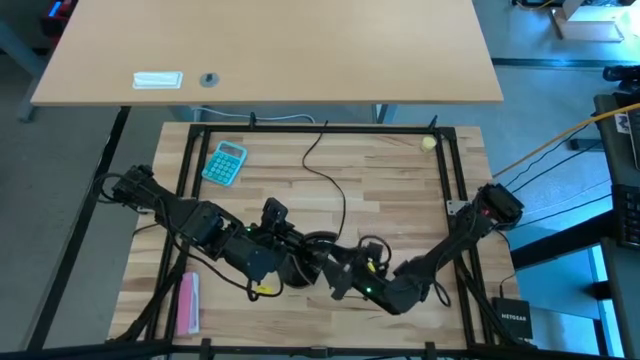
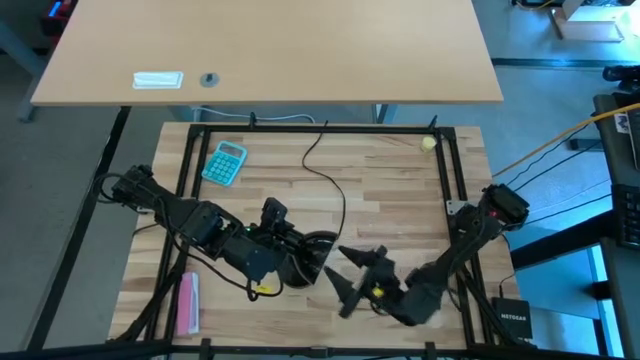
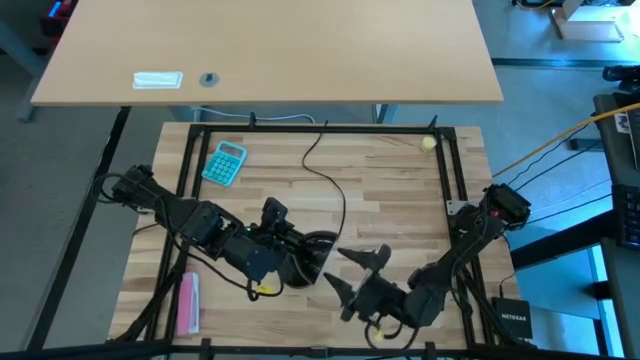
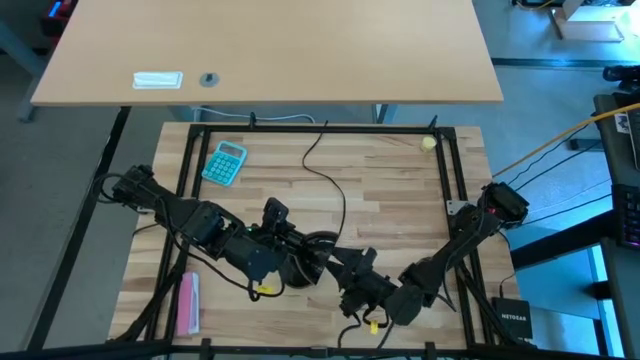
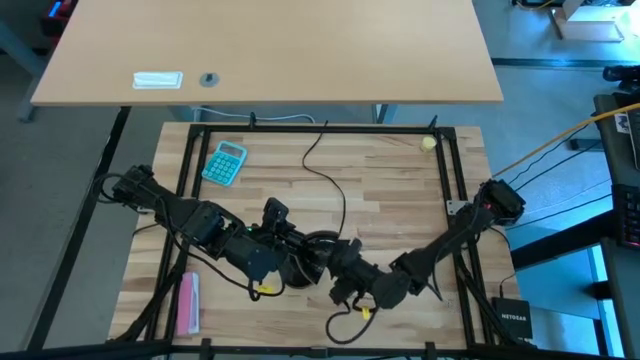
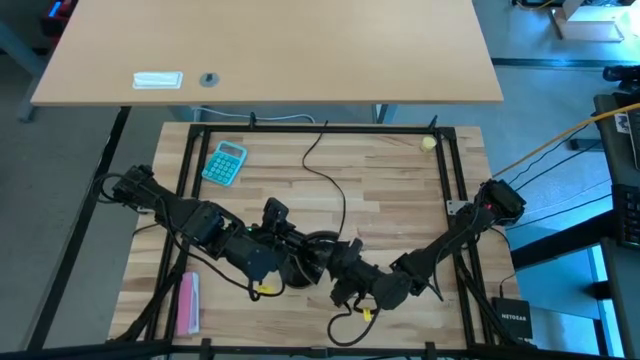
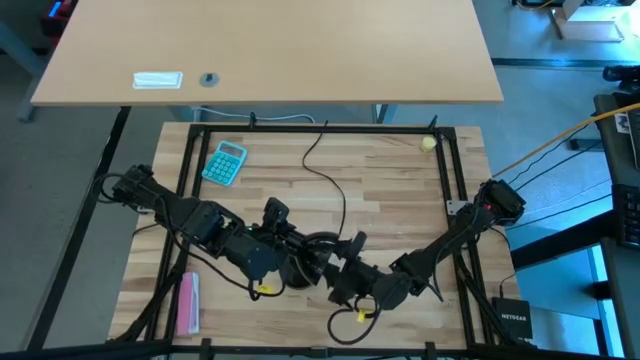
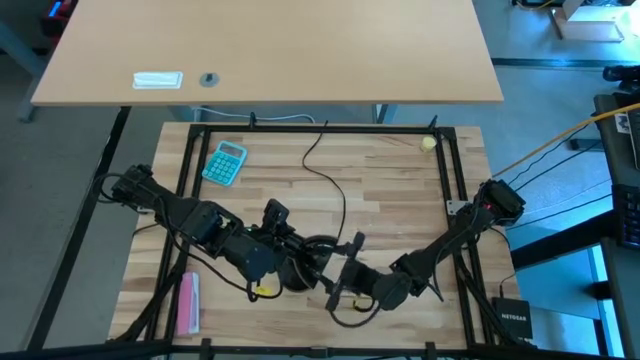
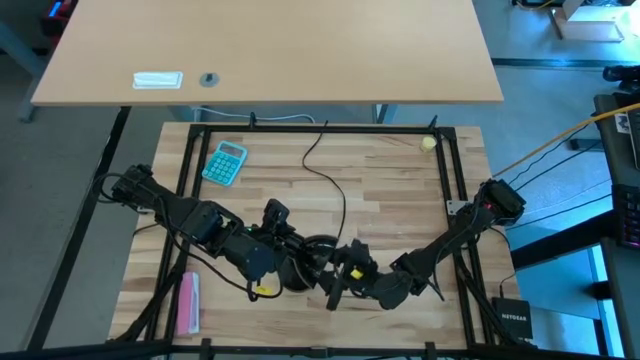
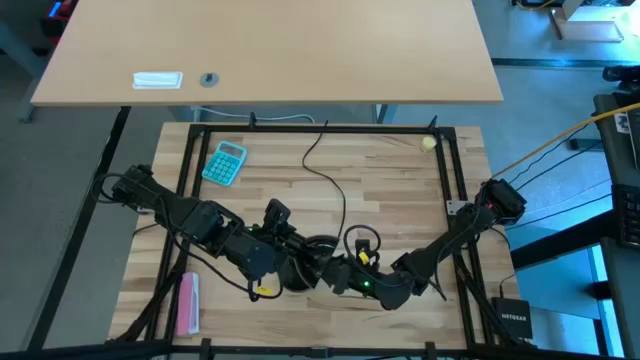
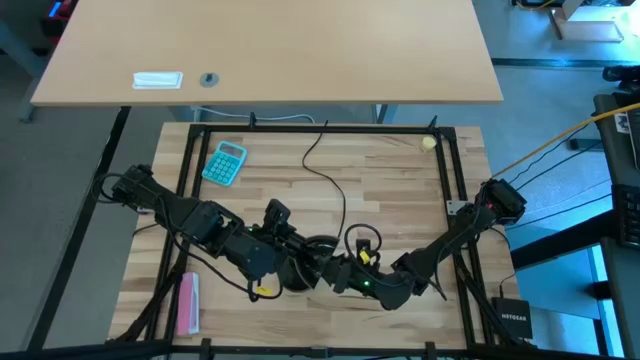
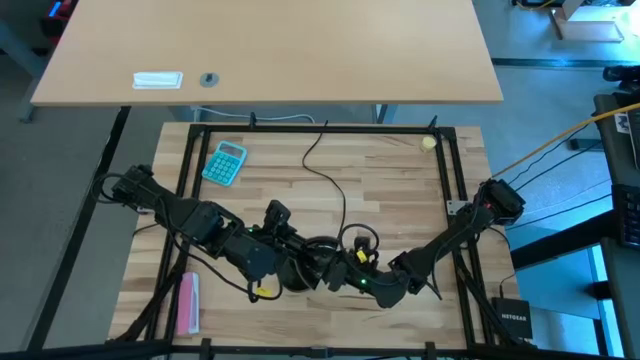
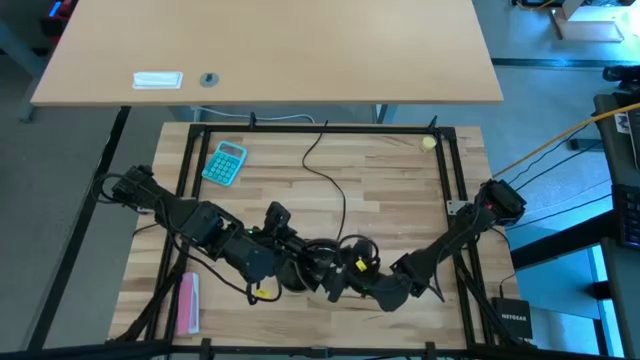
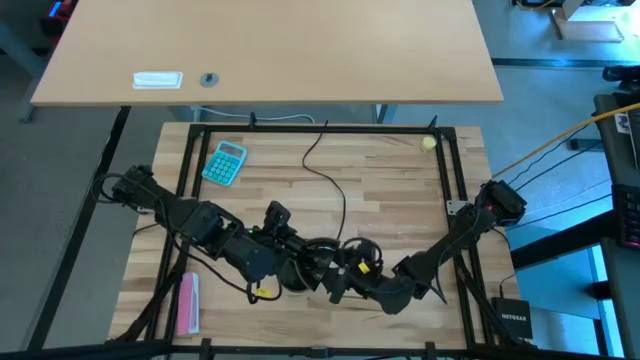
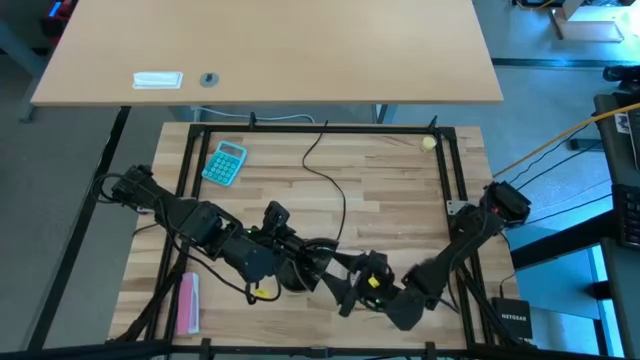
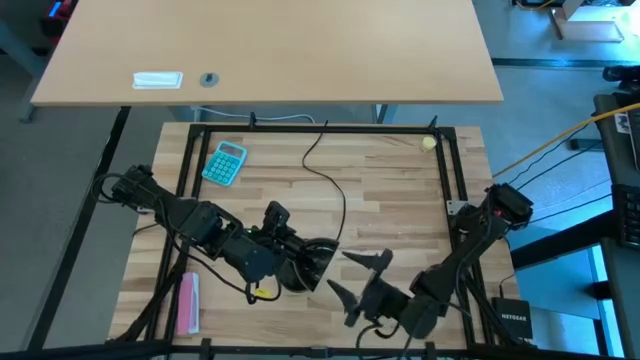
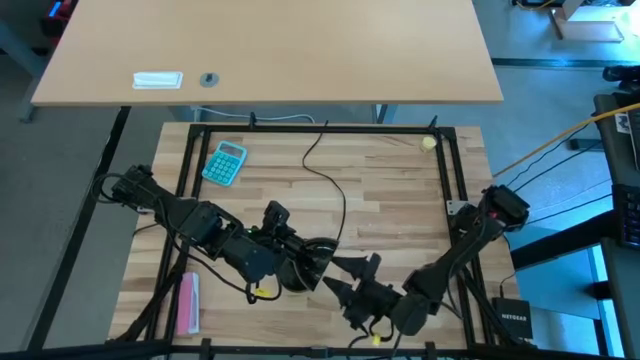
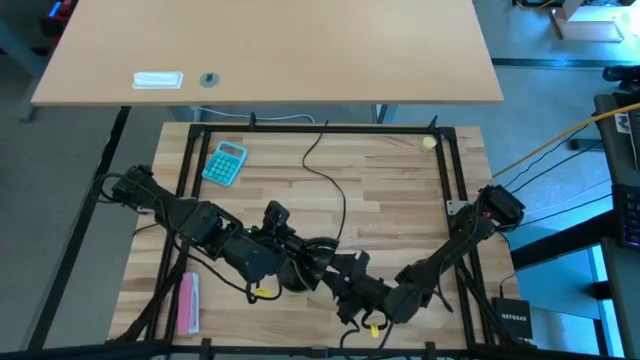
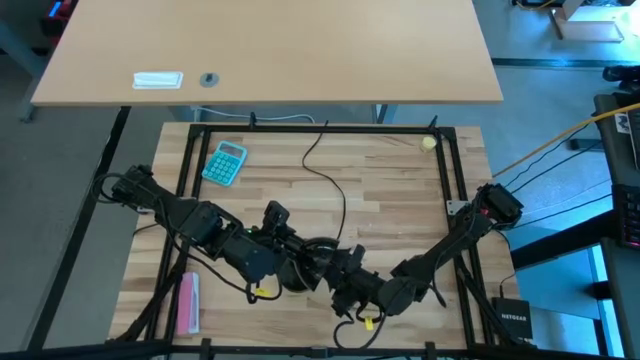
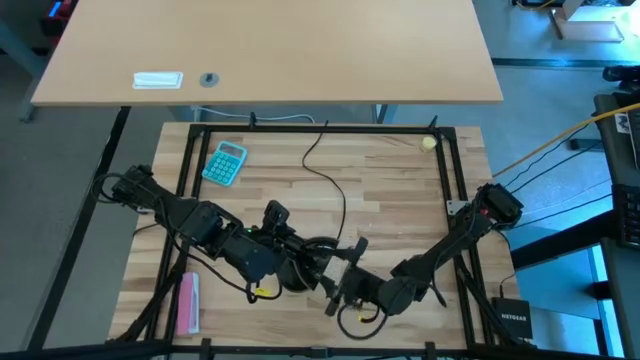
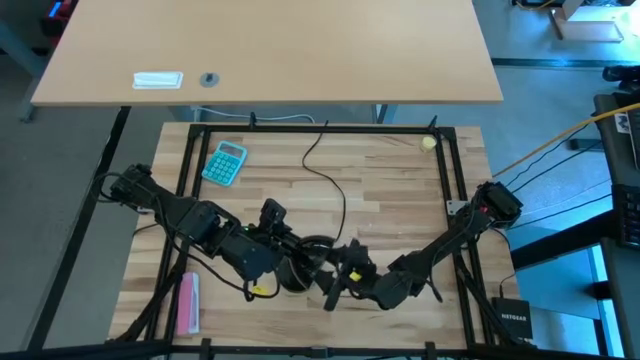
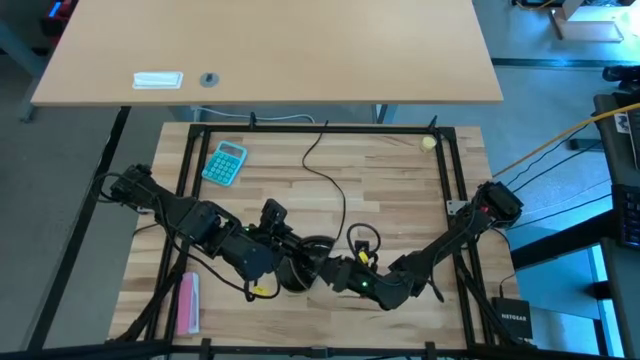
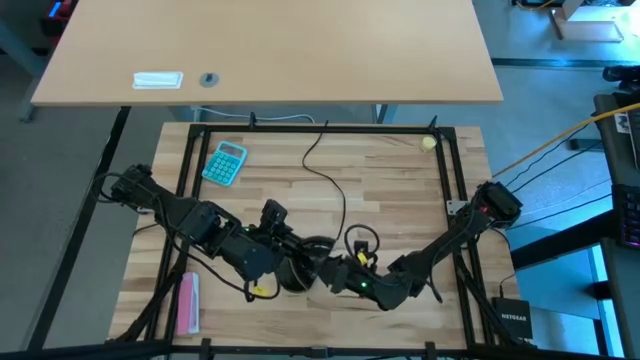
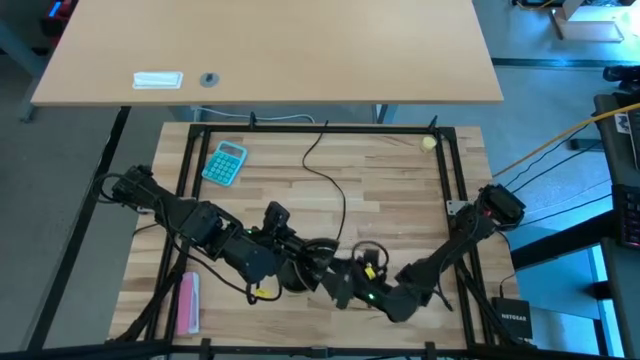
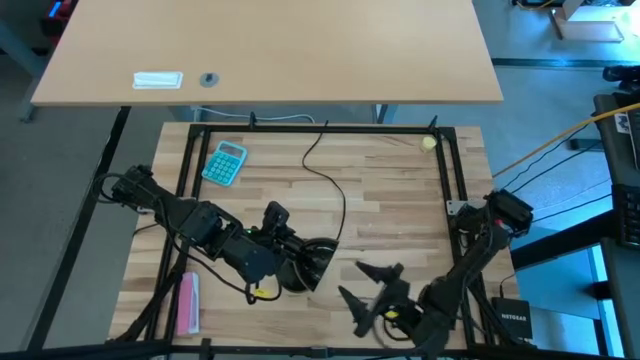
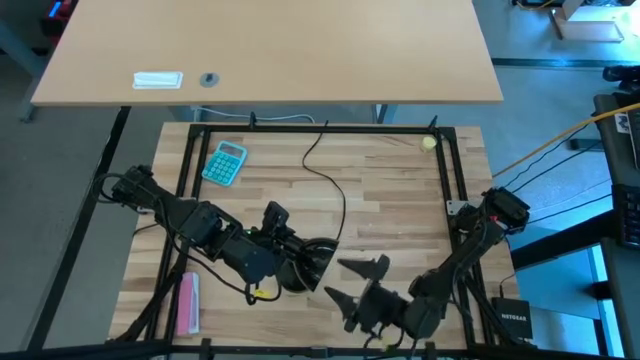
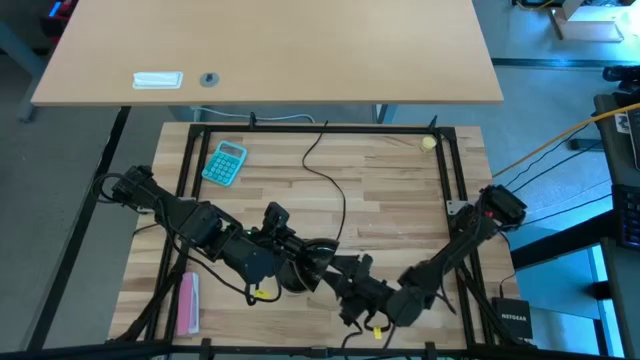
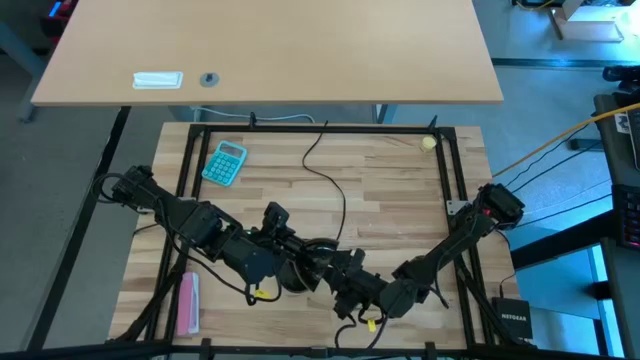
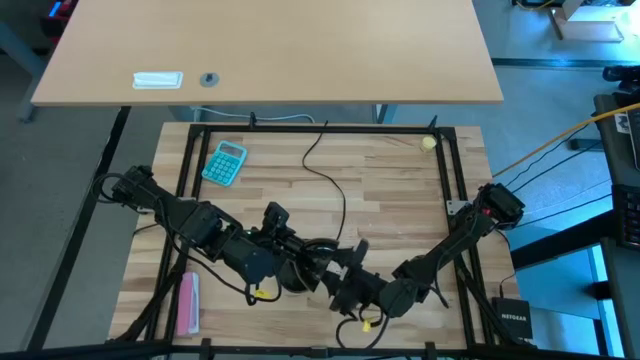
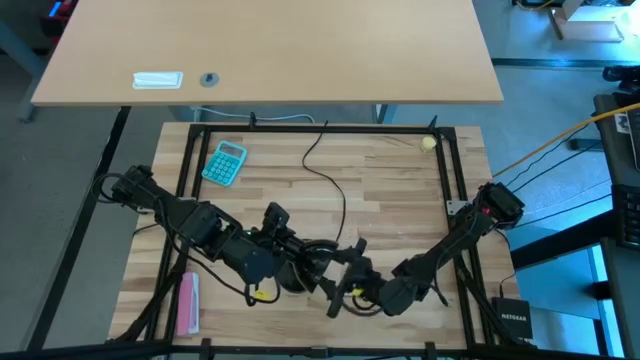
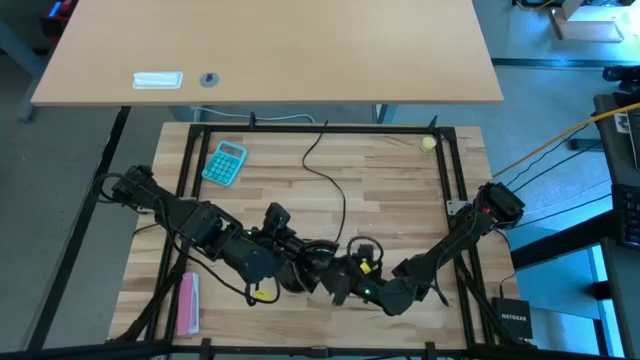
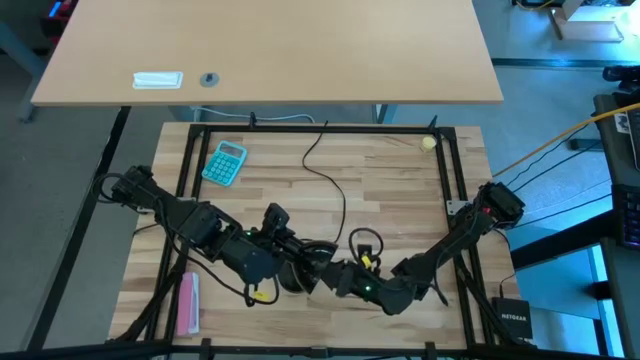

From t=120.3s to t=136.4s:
Task: Screw lightbulb
Insert the lightbulb into the black lamp

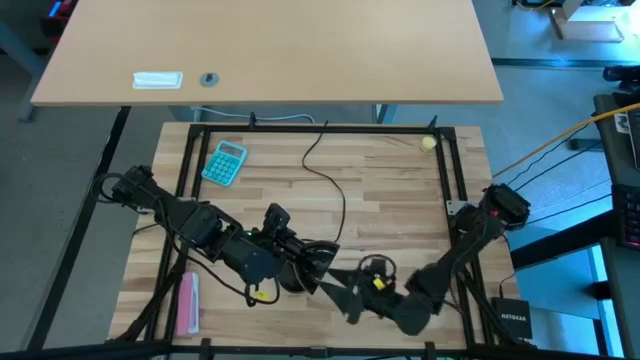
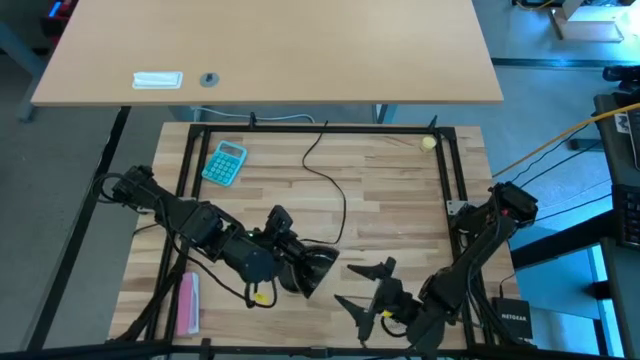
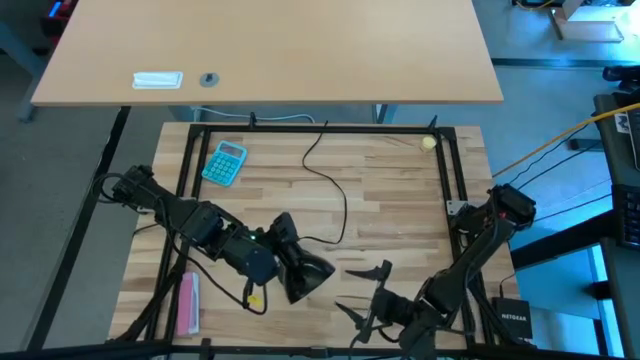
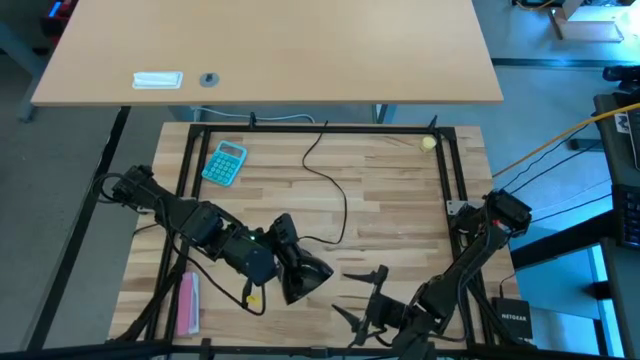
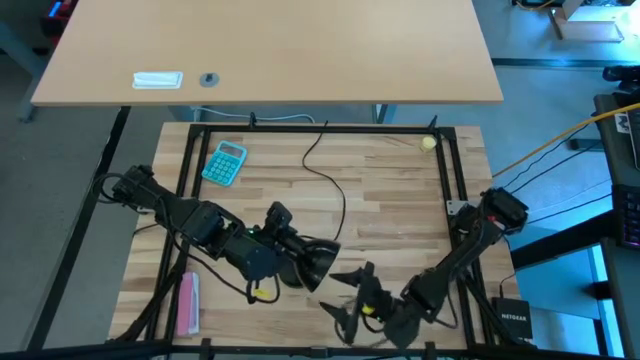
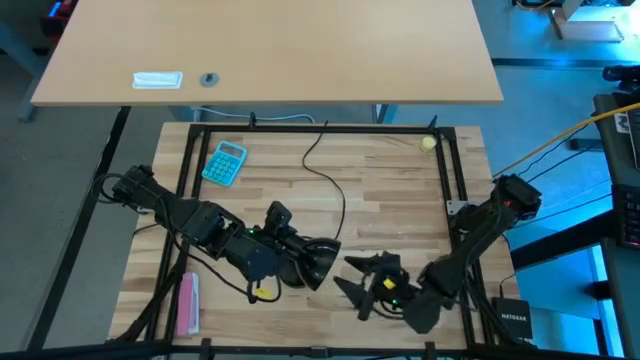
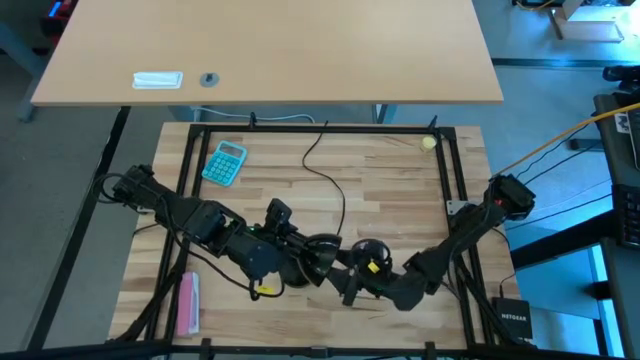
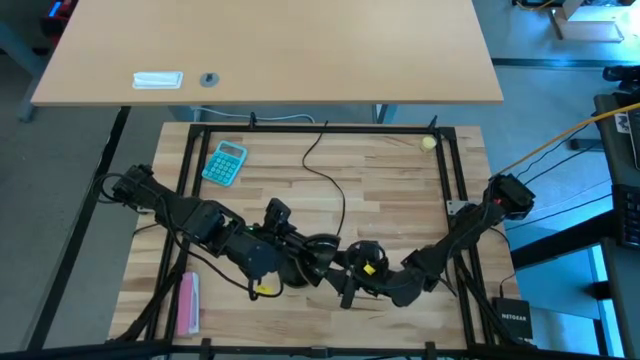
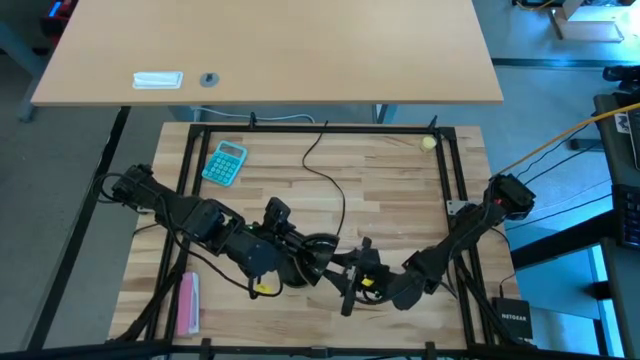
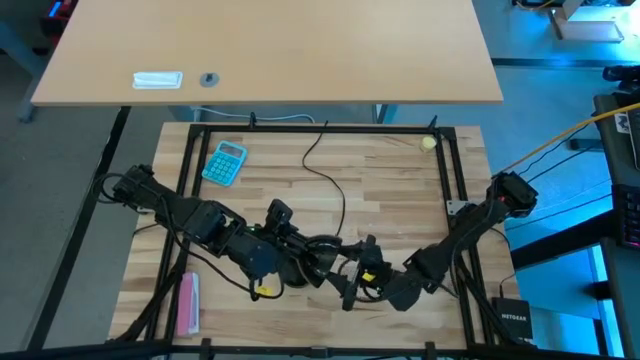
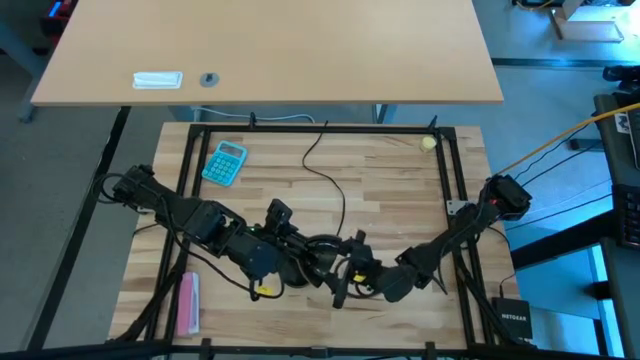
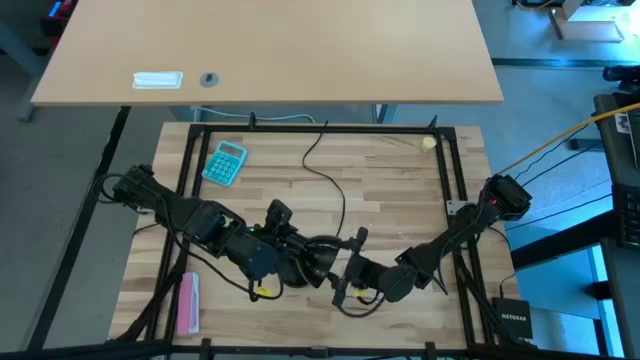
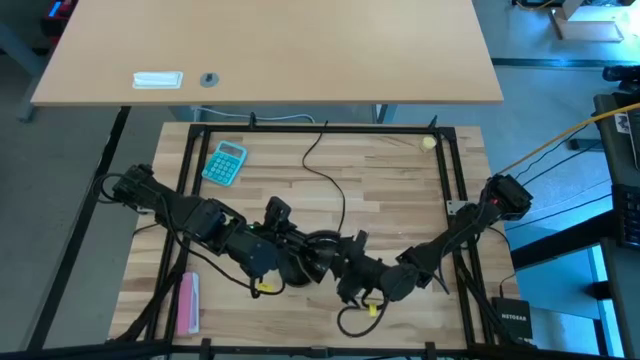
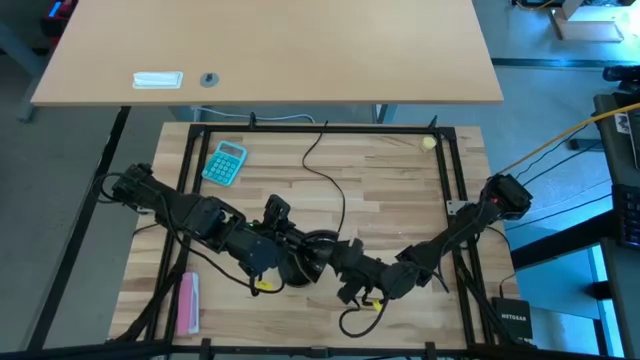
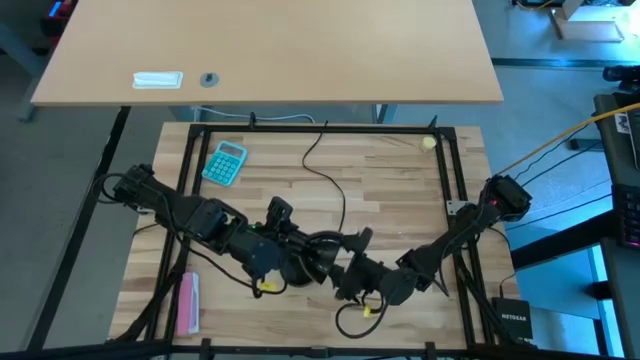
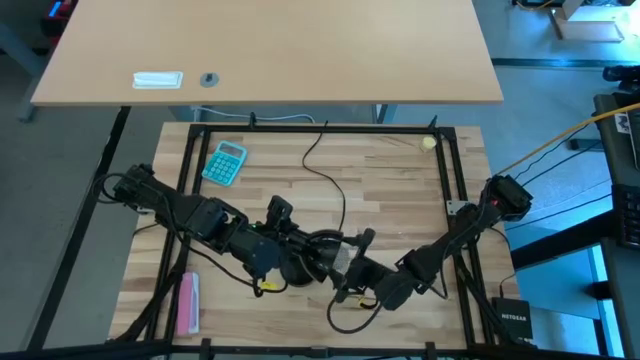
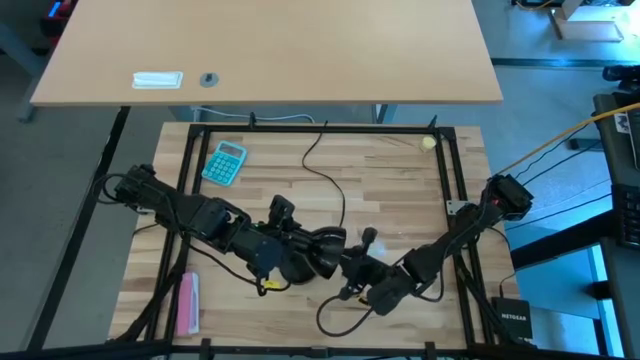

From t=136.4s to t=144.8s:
Remove the lightbulb from the black lamp
